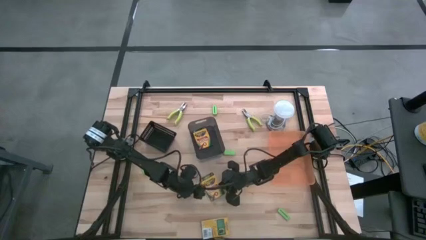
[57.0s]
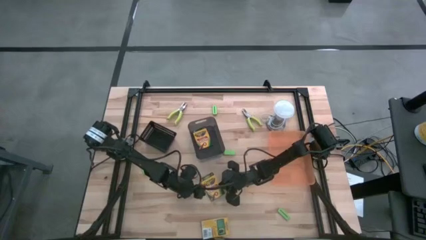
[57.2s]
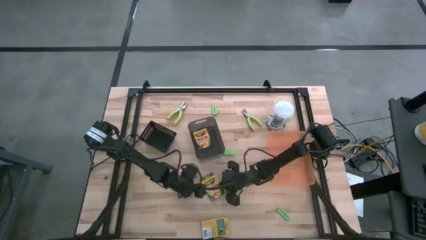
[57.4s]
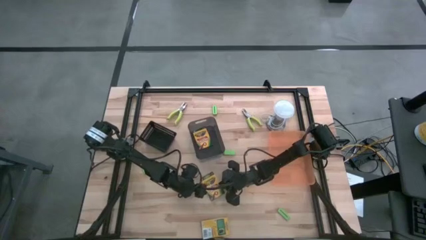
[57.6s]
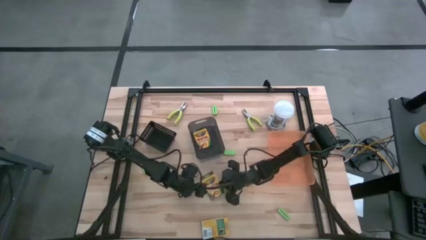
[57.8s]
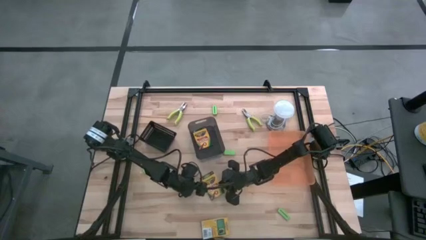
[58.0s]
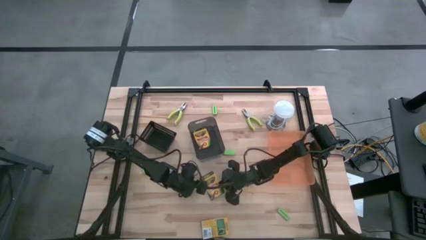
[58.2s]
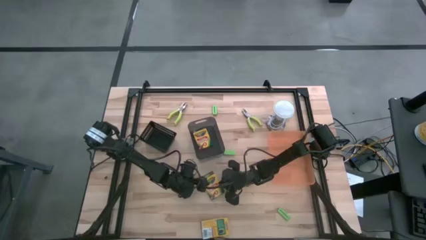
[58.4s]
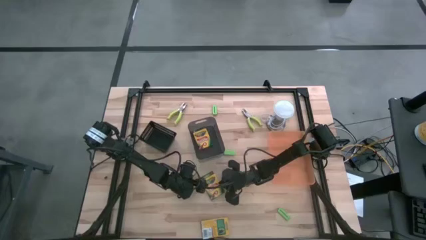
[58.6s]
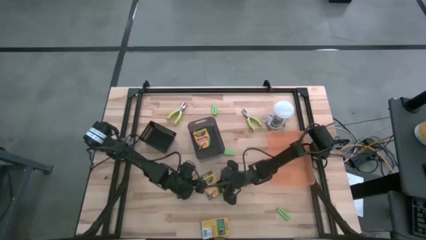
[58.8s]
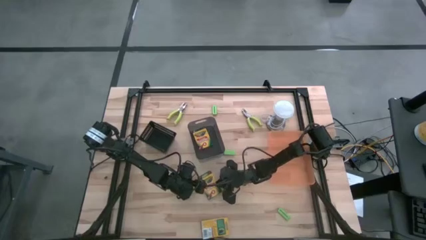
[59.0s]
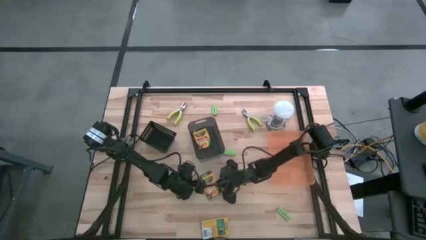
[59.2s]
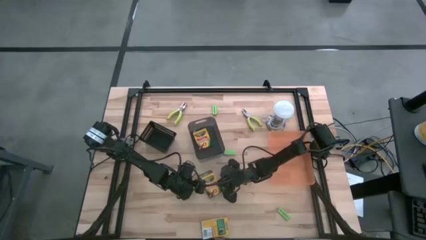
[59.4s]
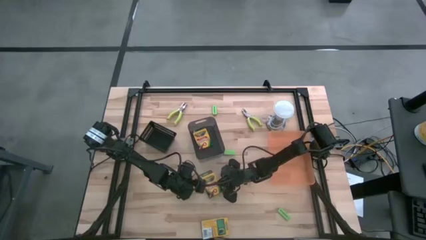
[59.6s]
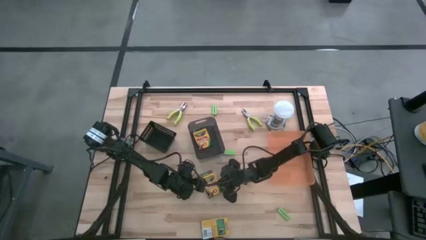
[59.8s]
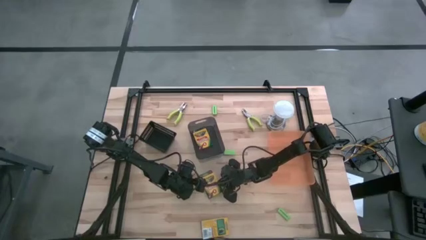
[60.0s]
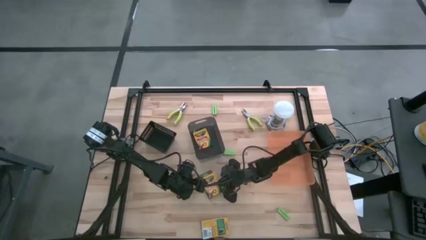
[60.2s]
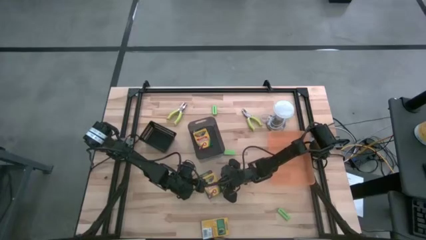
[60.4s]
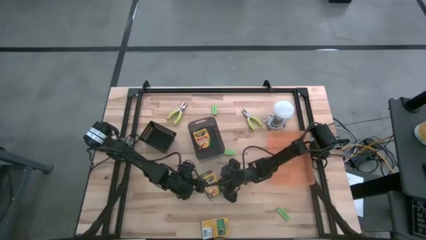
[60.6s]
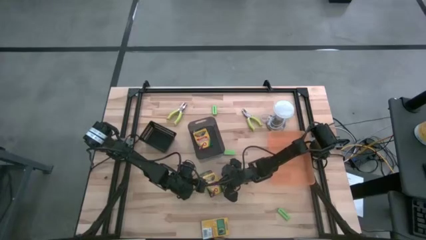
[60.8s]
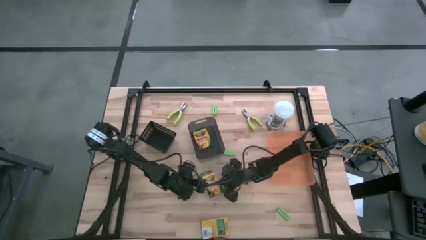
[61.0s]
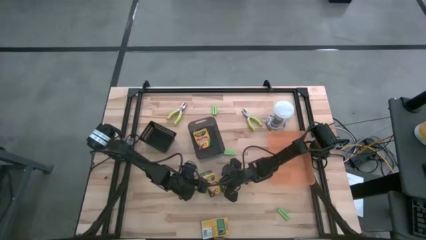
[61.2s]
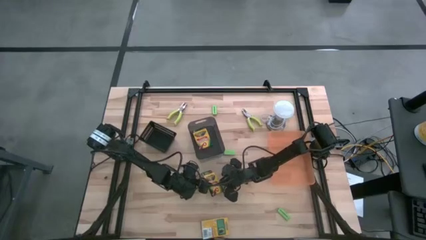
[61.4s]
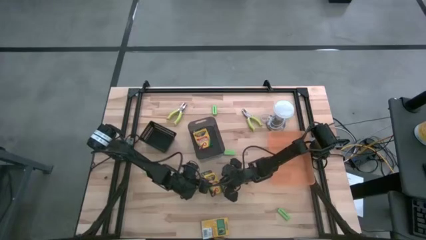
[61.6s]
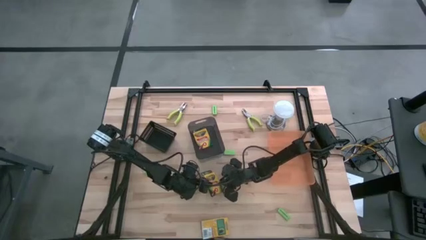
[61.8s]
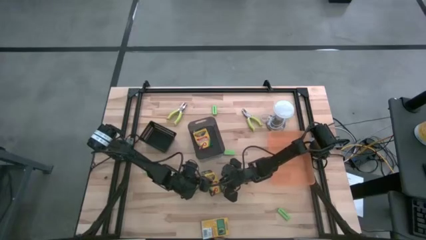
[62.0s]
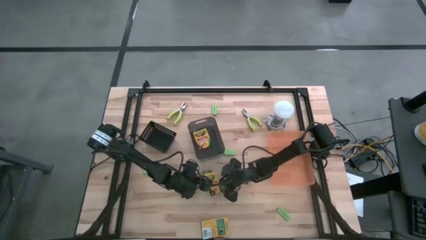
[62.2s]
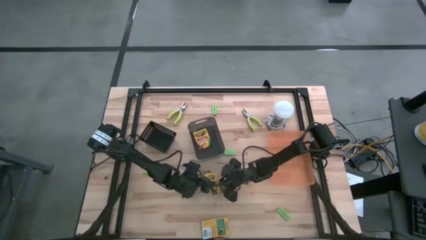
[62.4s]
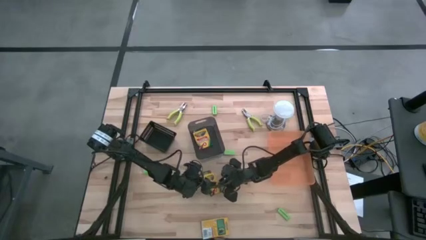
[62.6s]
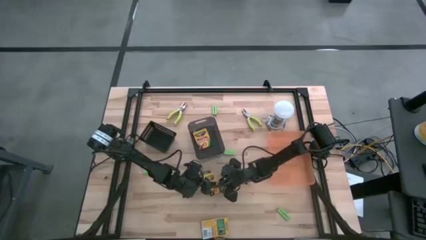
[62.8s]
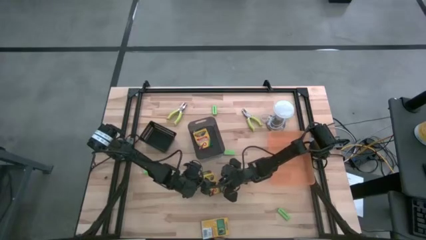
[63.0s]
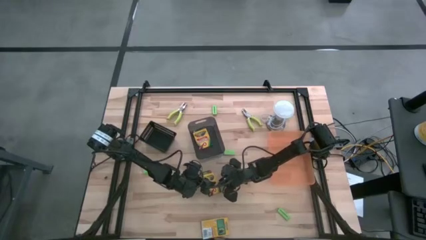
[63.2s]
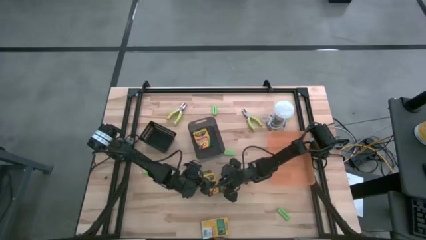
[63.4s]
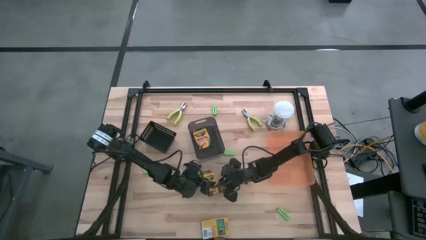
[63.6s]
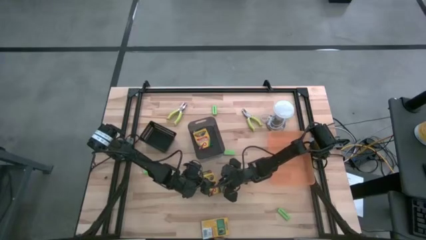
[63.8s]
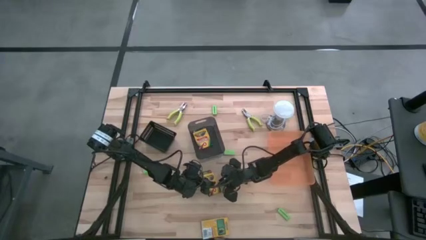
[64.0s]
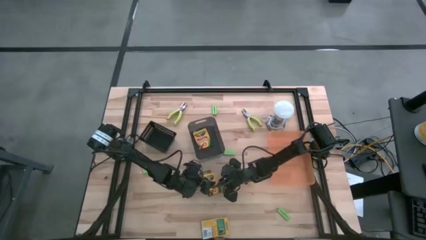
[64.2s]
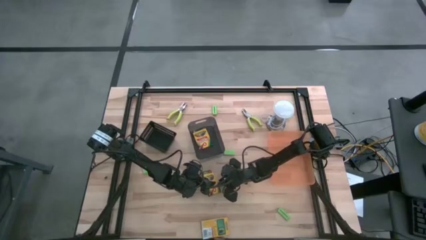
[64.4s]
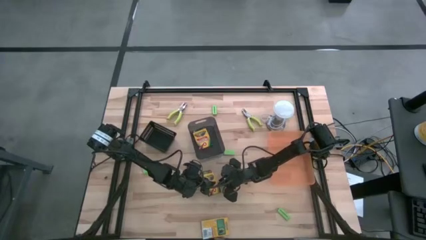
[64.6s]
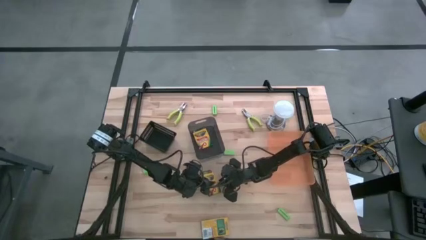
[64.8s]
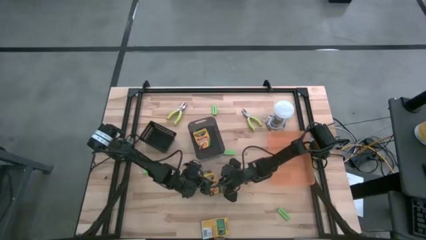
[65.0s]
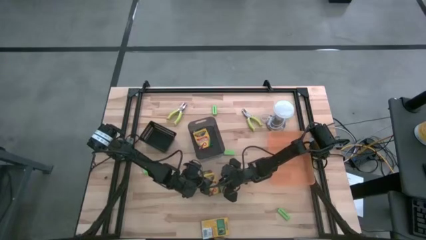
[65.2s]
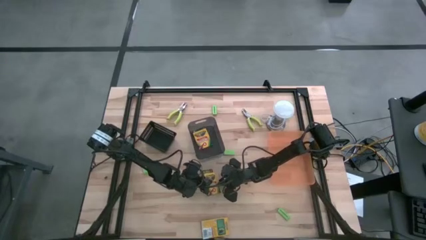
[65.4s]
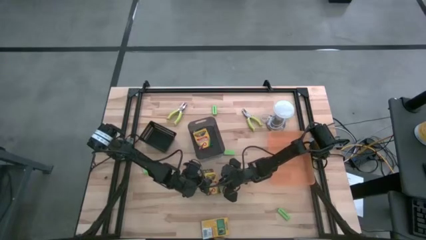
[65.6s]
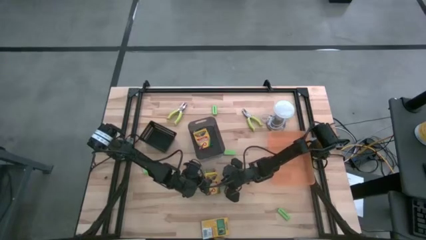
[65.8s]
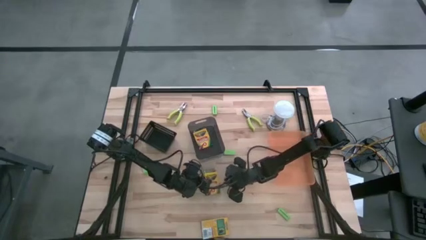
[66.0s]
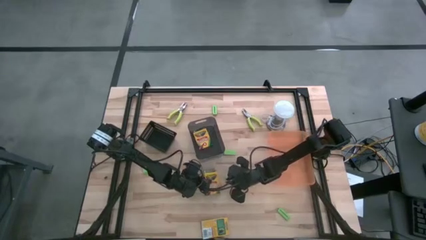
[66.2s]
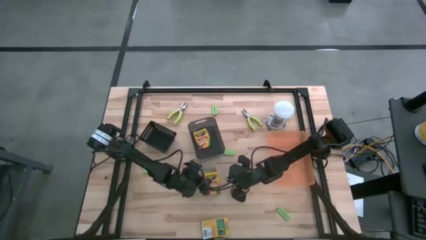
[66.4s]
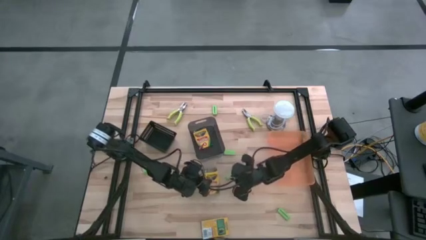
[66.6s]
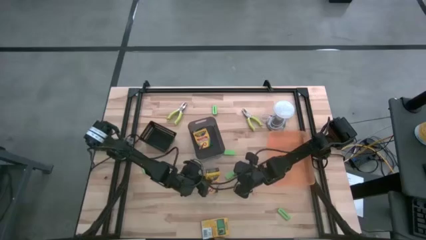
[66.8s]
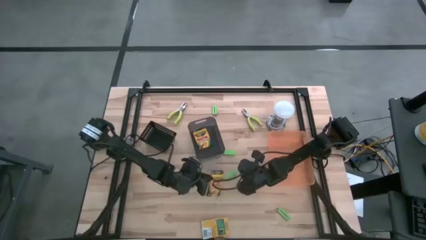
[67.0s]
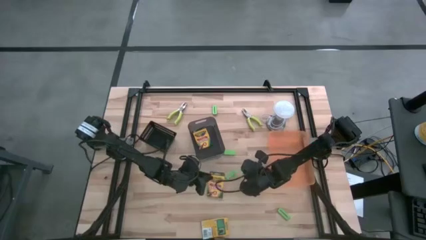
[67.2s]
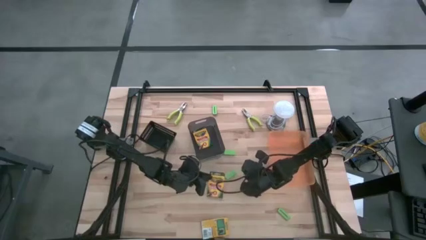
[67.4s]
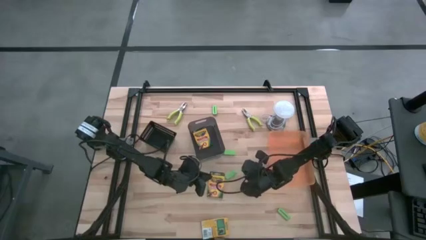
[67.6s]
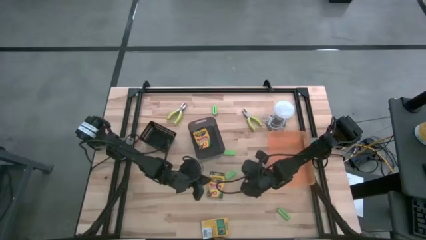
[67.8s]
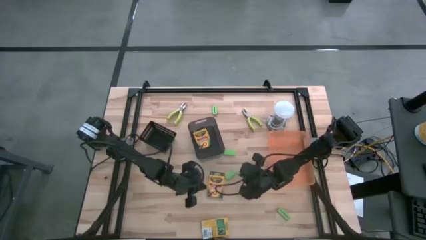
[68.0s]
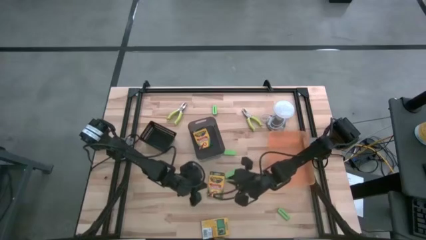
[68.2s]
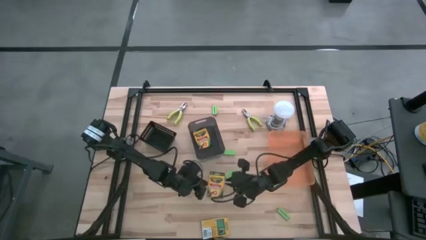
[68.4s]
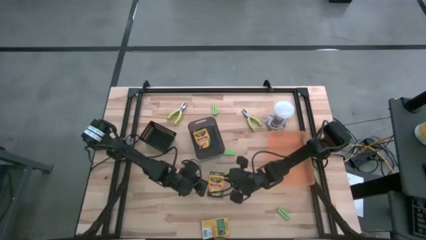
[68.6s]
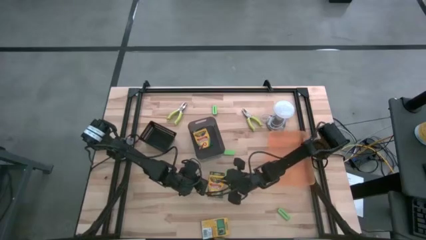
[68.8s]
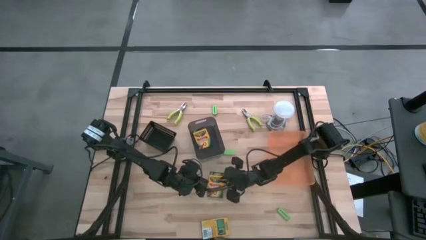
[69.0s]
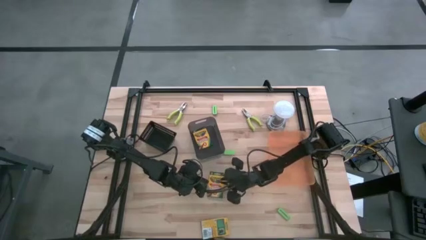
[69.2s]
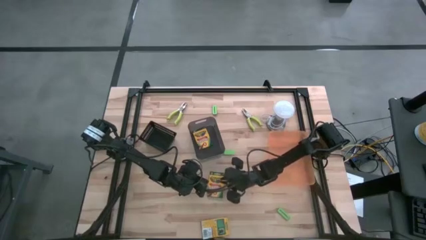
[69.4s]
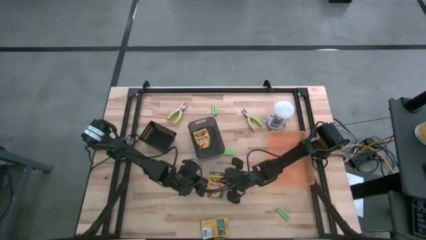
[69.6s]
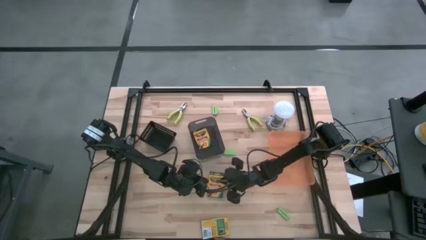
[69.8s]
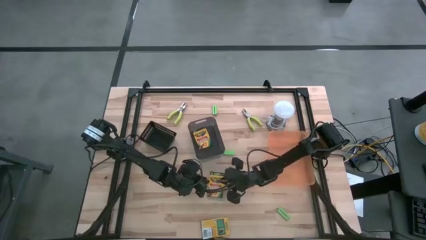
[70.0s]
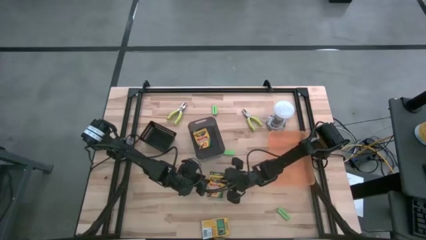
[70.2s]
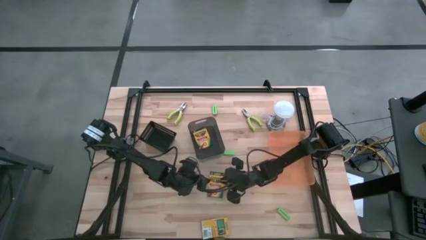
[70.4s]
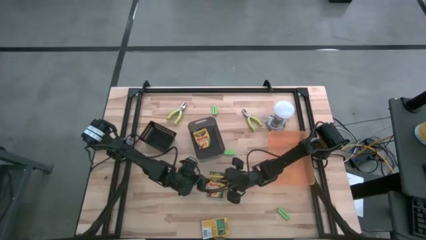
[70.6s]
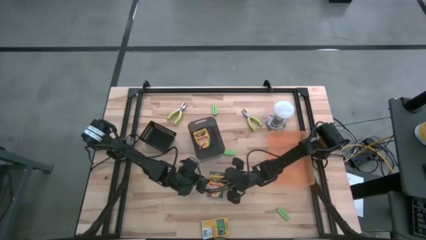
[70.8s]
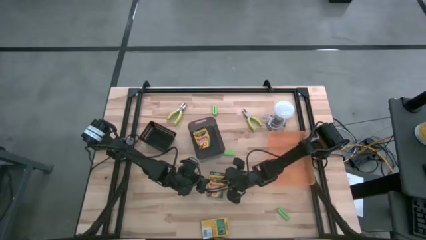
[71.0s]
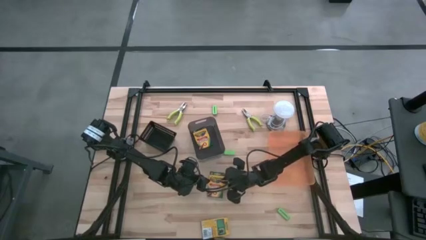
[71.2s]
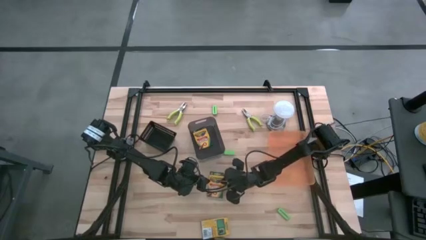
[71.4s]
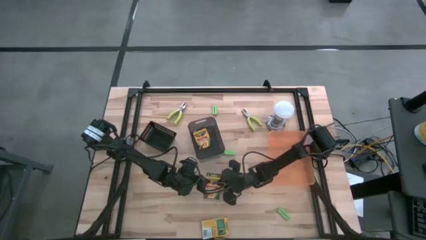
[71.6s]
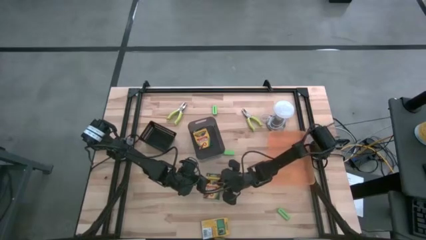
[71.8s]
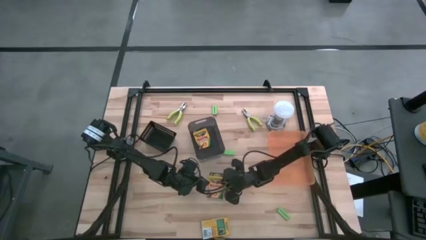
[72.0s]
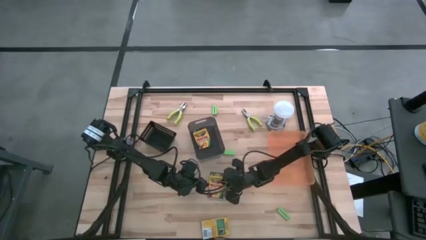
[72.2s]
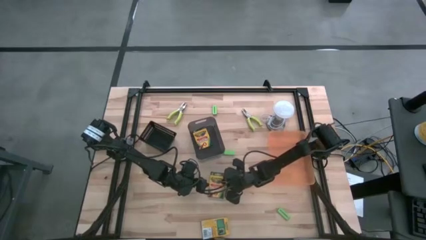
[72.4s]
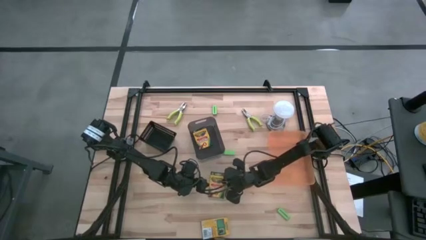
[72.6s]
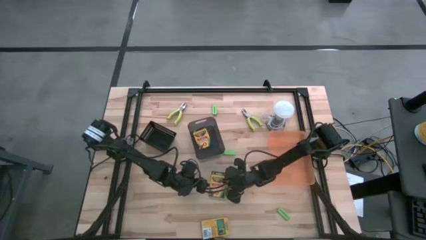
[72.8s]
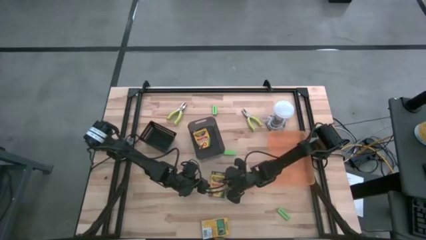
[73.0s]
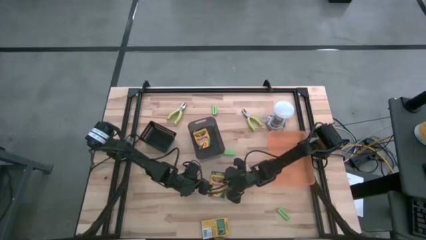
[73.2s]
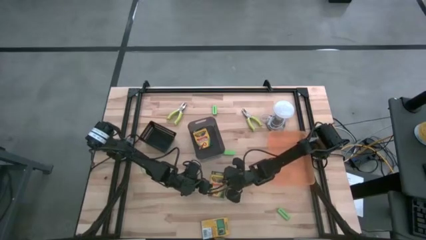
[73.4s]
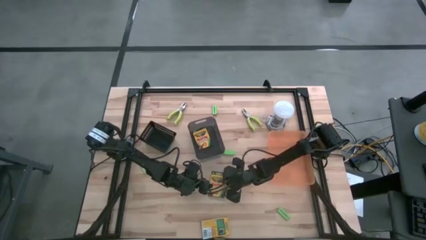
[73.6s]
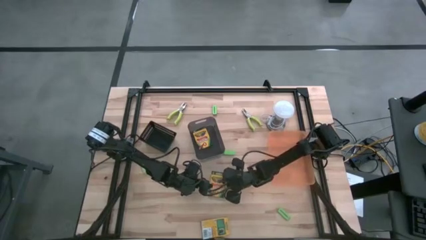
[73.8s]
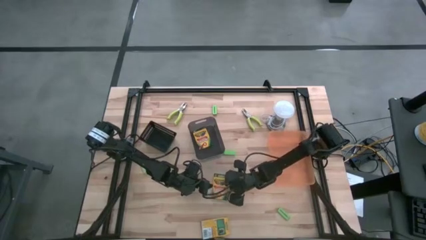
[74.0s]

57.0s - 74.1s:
Task: Pick & Place School Supplies
Put the left yellow crayon box into the black transparent bin
